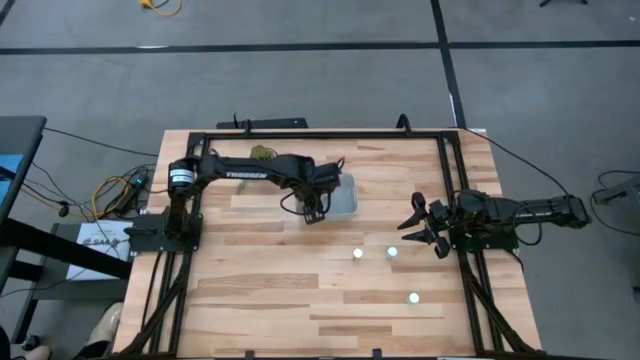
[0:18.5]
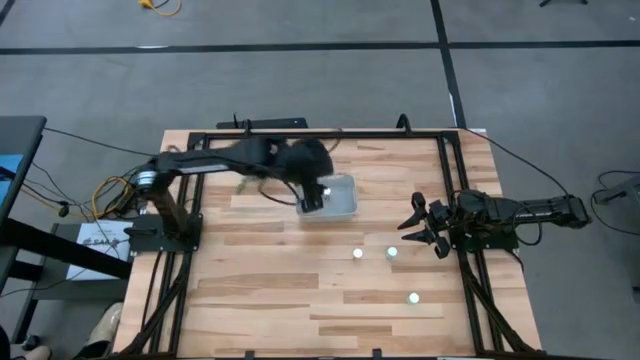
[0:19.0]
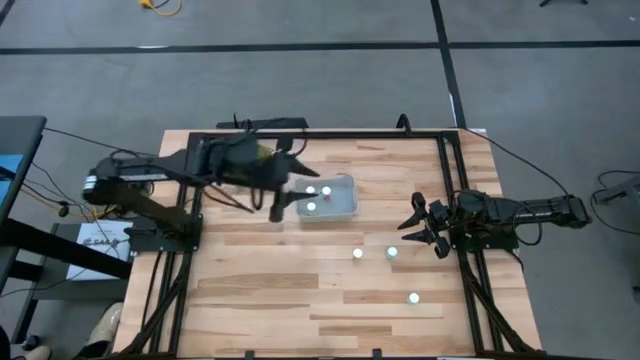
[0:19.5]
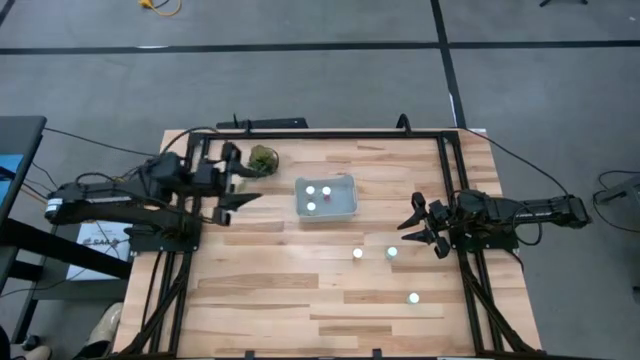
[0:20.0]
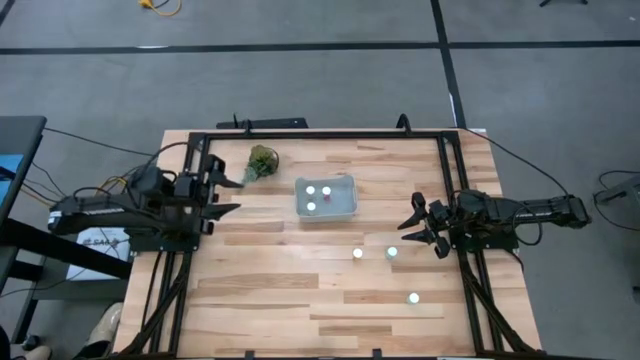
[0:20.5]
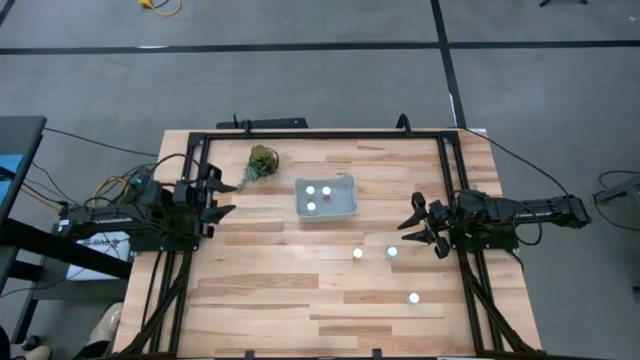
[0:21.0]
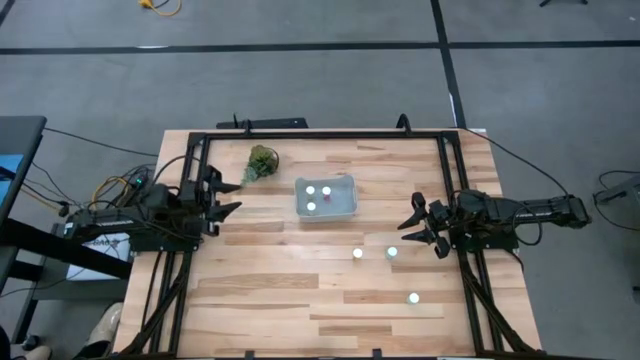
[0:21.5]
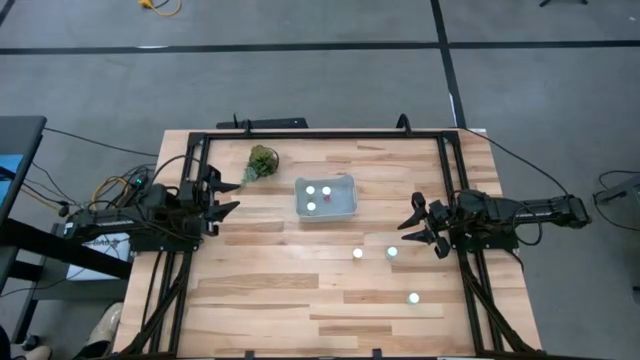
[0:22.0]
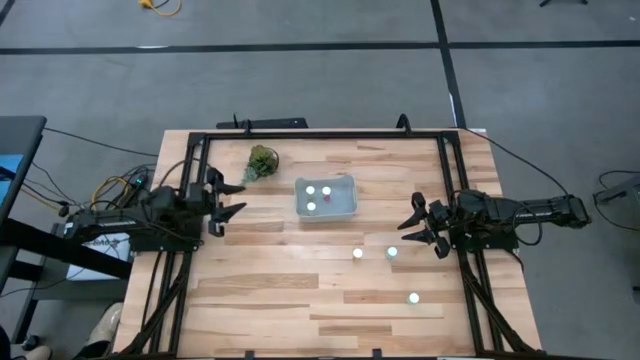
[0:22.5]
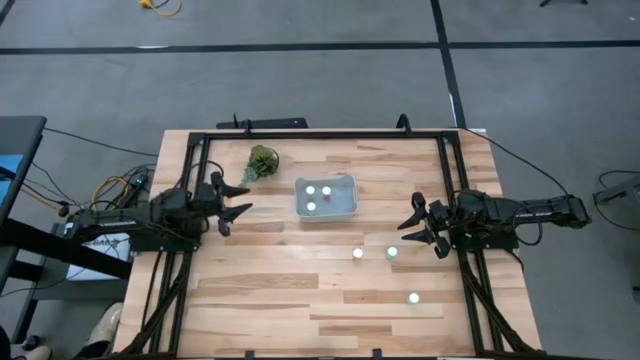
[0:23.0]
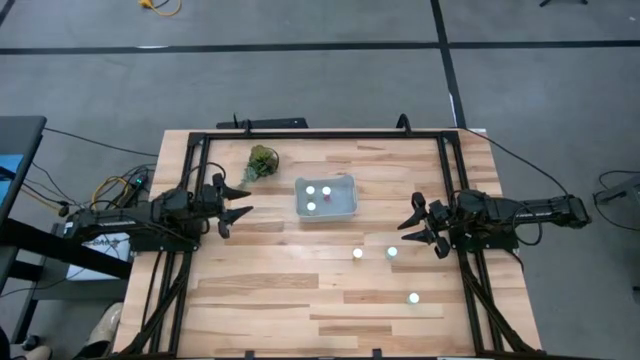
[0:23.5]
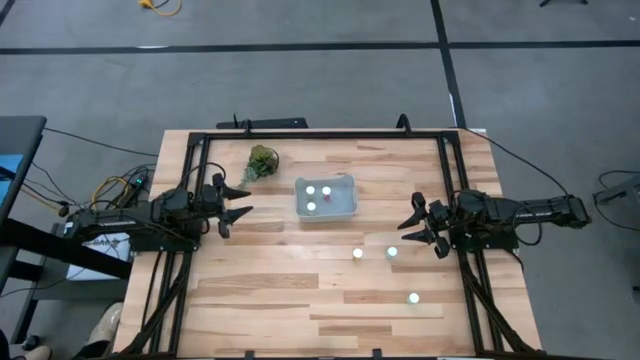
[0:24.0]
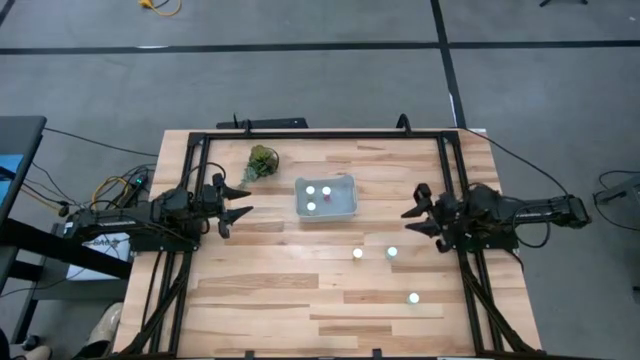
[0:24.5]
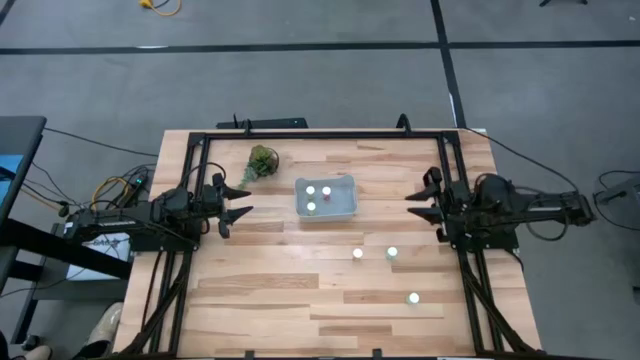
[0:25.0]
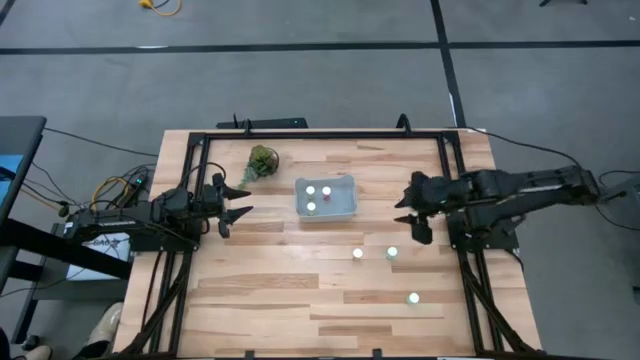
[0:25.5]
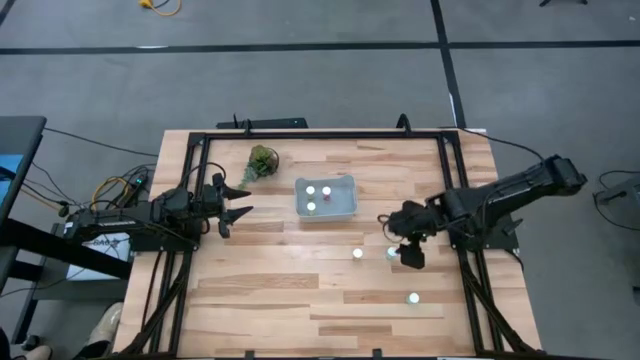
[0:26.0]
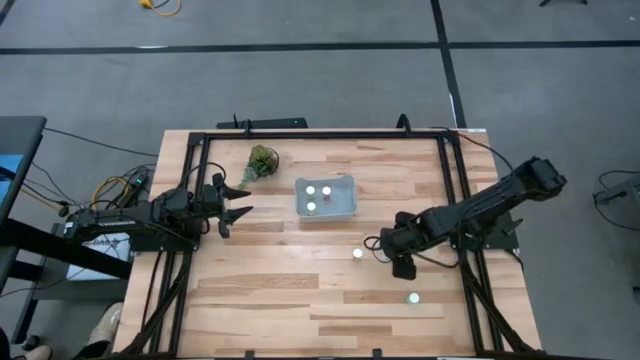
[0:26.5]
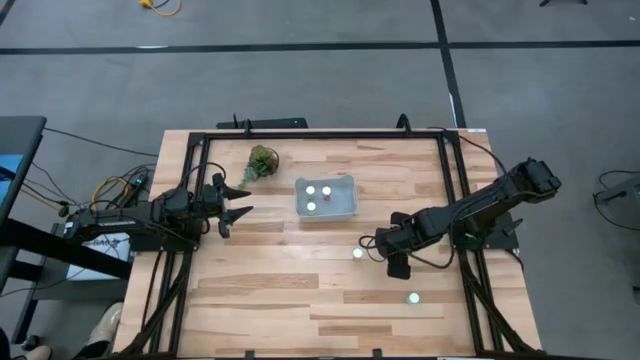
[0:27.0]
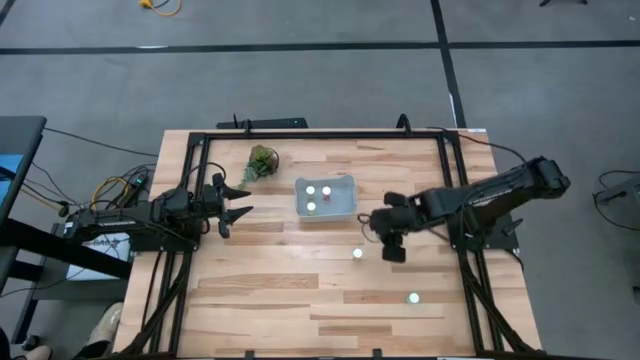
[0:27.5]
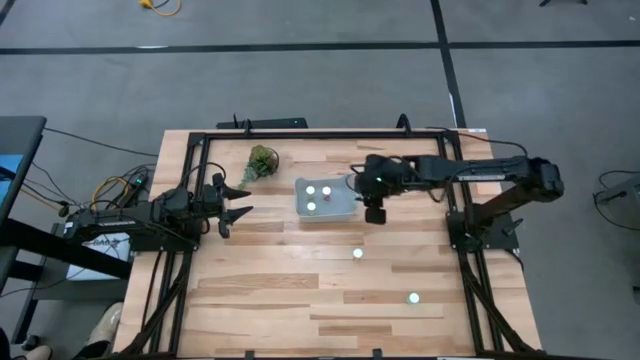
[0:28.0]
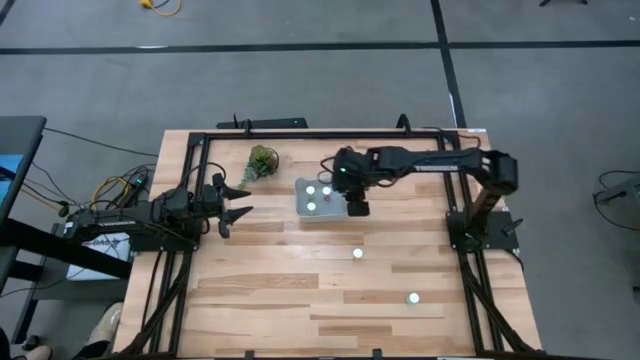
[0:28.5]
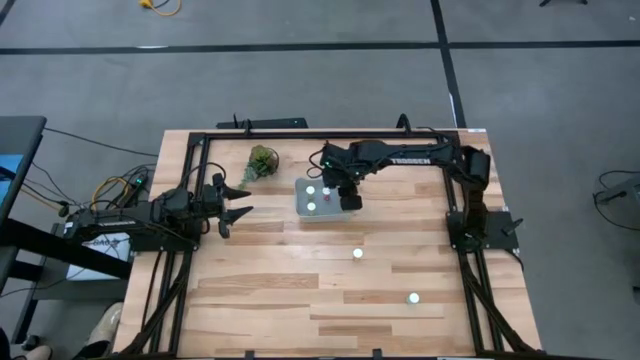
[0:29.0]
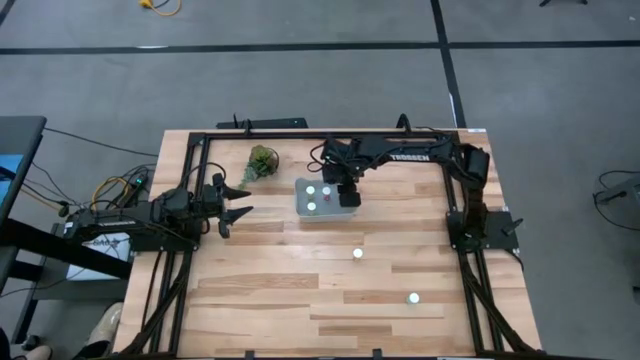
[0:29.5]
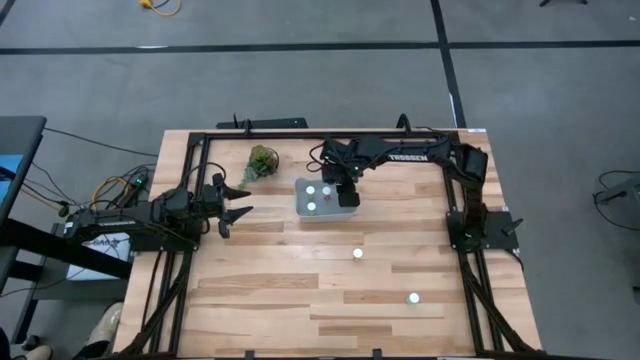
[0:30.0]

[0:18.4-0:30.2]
Task: Pick and place pill bottles into a basket
Put the top blue pill bottle into the gray bin

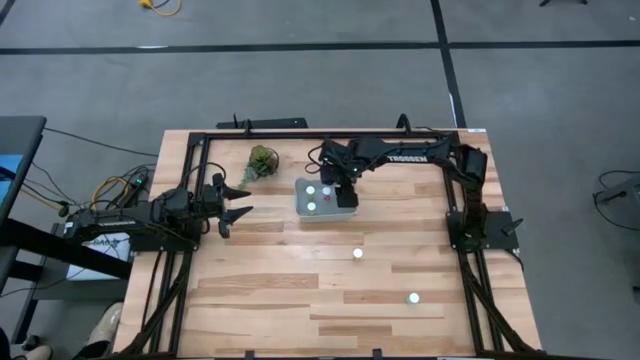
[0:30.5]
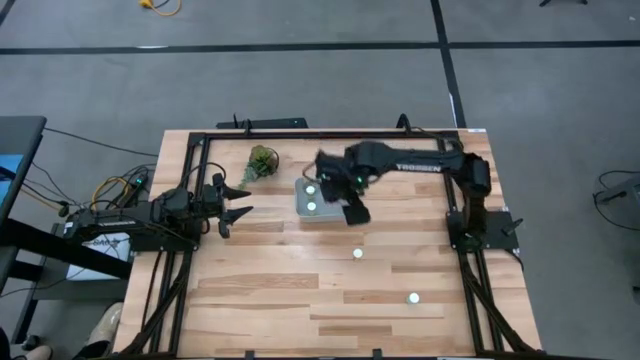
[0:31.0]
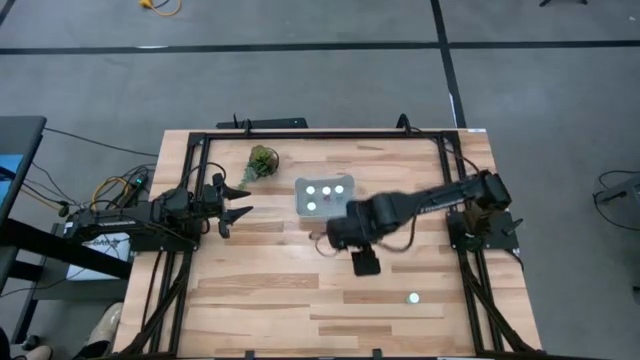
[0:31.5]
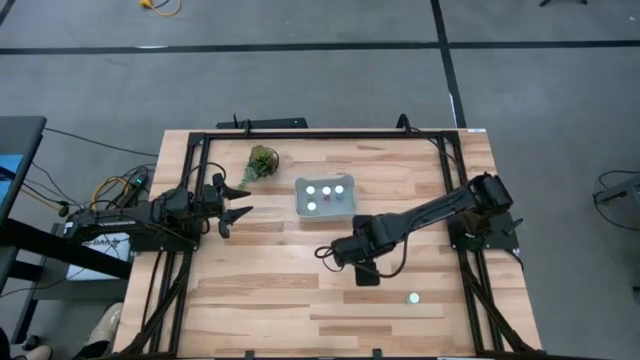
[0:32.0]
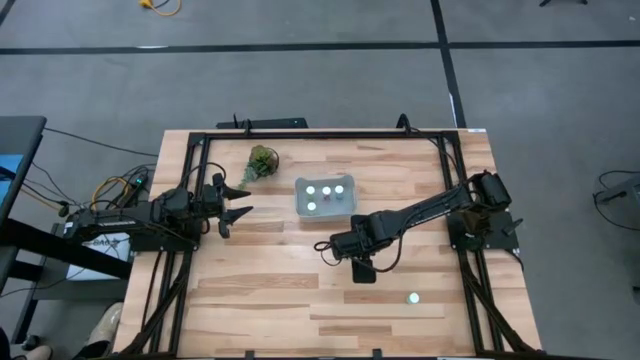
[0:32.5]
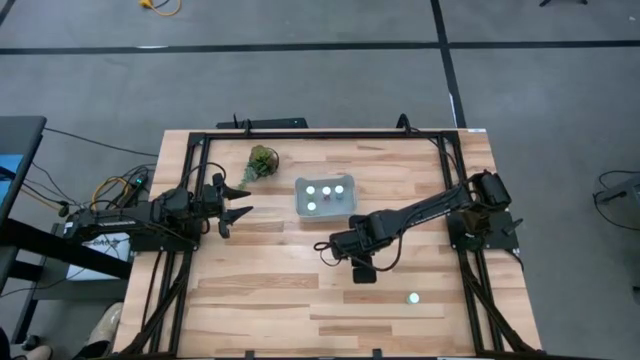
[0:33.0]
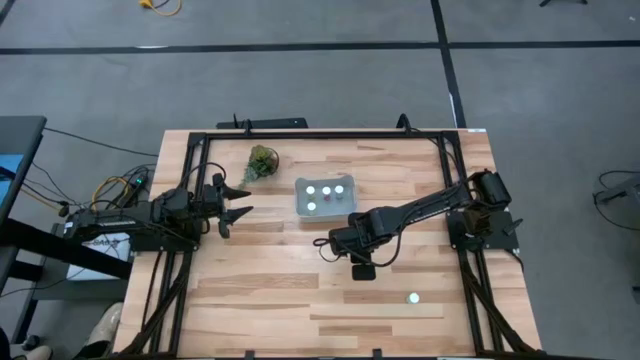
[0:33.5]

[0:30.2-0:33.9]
Put the yellow pill bottle into the gray bin

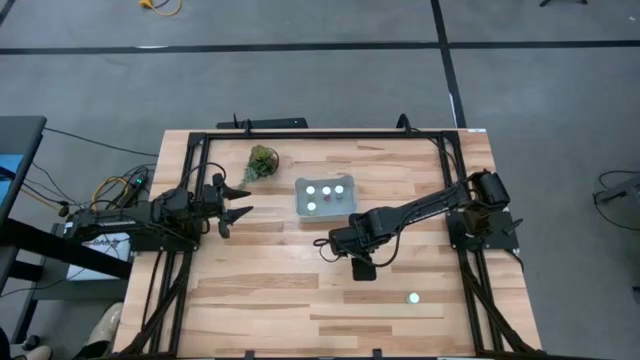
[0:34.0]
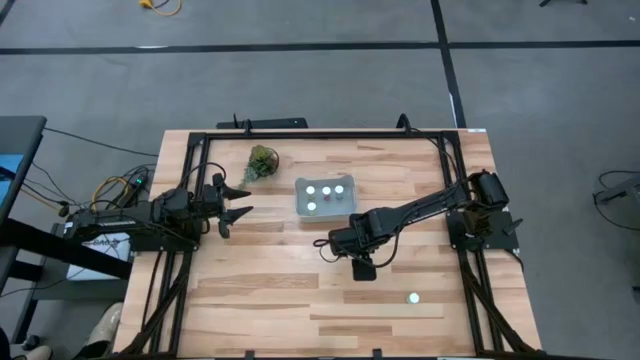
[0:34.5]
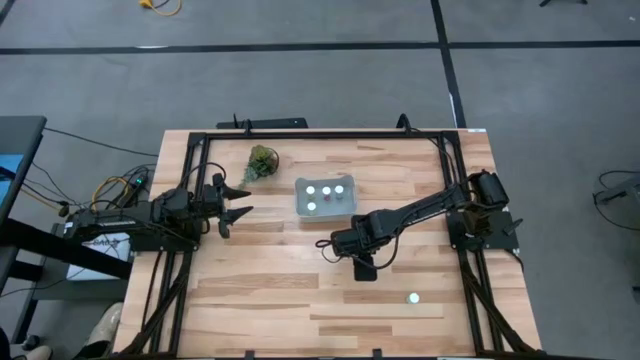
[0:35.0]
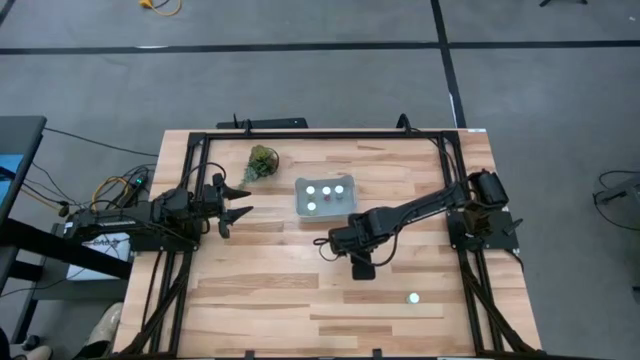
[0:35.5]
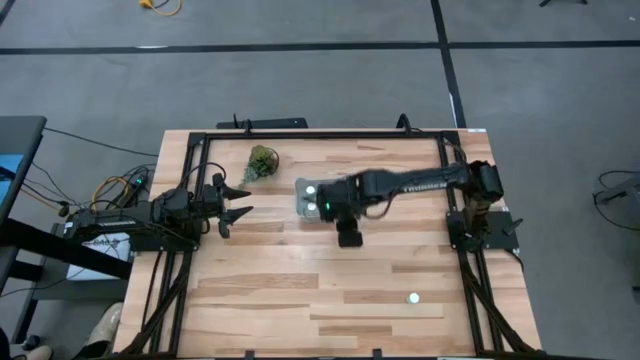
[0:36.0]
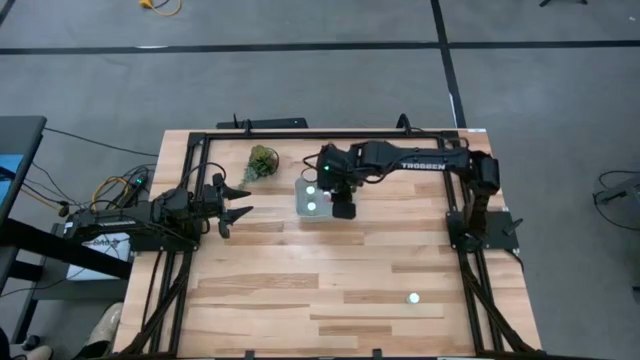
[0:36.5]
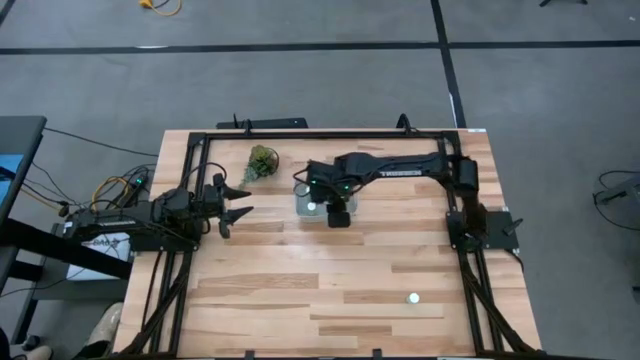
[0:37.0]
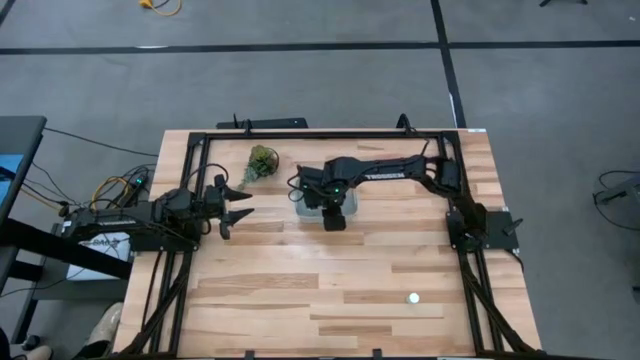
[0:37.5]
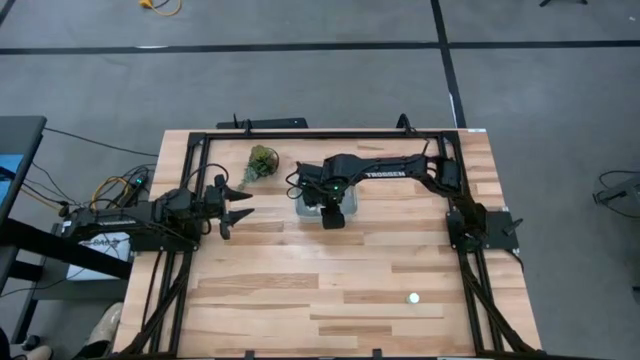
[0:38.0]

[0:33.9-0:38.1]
Put the yellow pill bottle into the gray bin

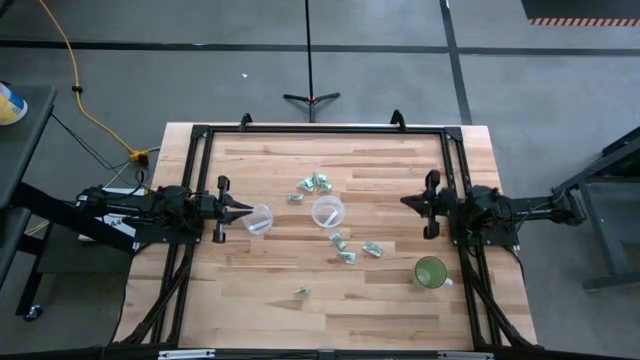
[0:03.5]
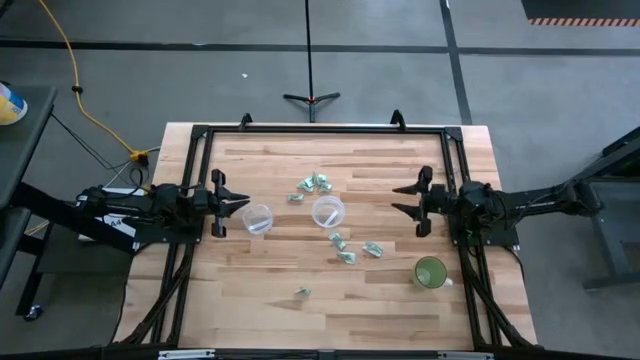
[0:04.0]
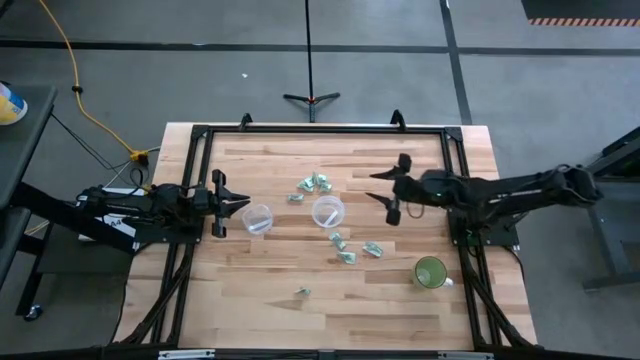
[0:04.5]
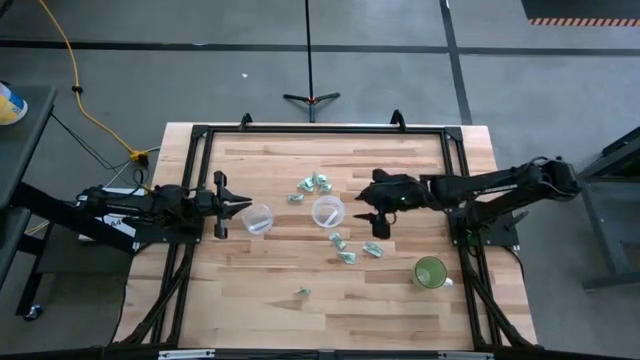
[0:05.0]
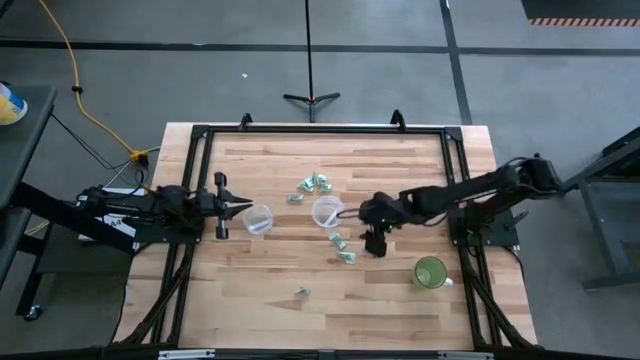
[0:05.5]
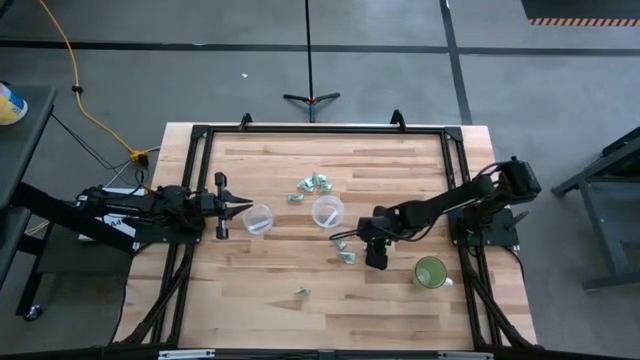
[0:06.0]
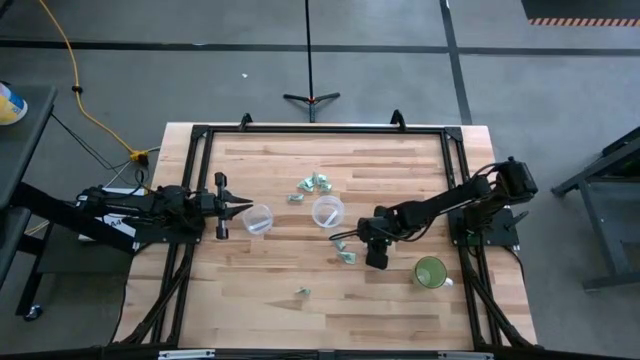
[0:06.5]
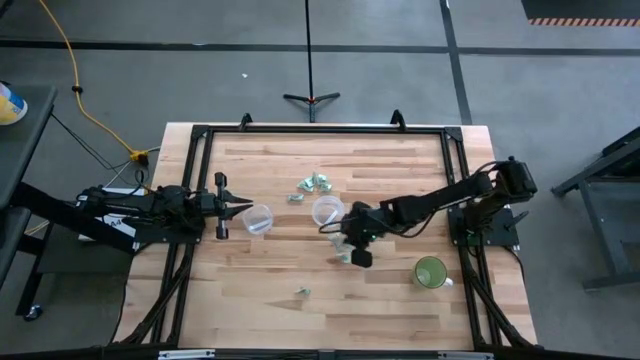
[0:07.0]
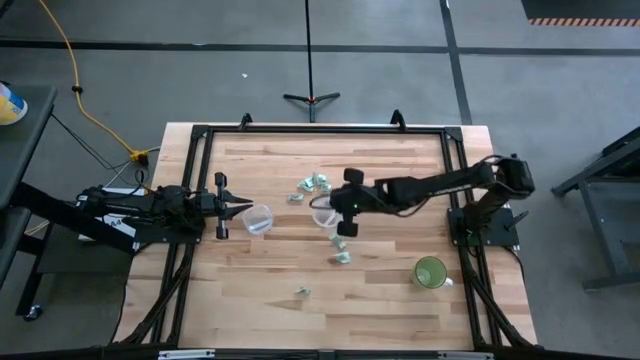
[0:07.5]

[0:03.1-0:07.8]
Task: Pick and place Stevia / Truvia into bins
Put the white stevia packet into the right transparent container
